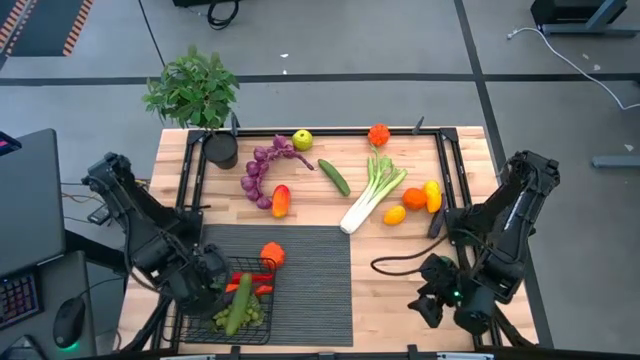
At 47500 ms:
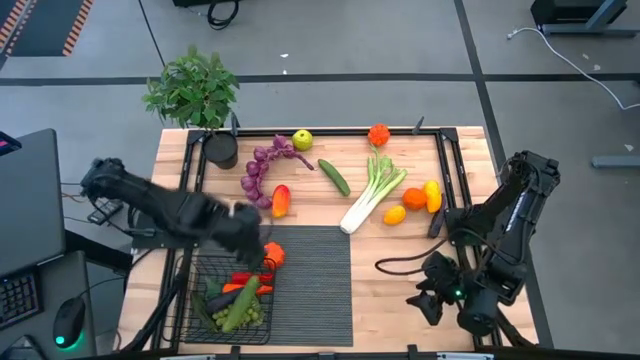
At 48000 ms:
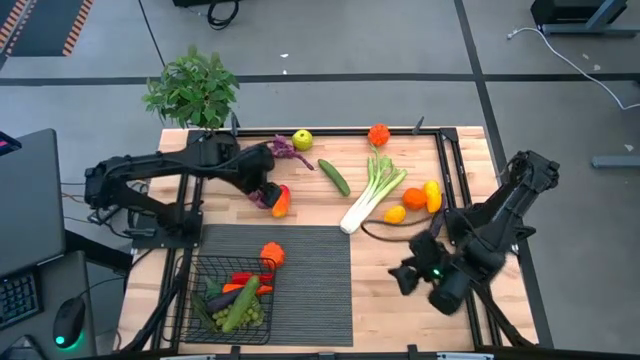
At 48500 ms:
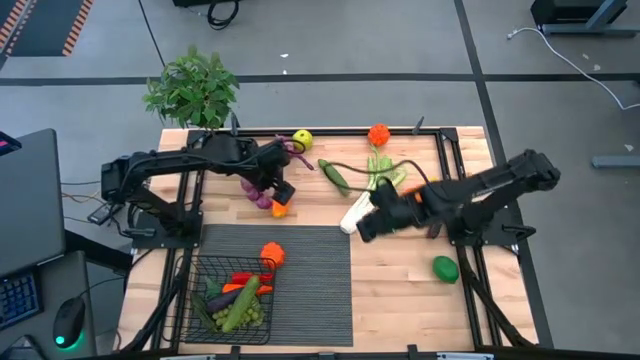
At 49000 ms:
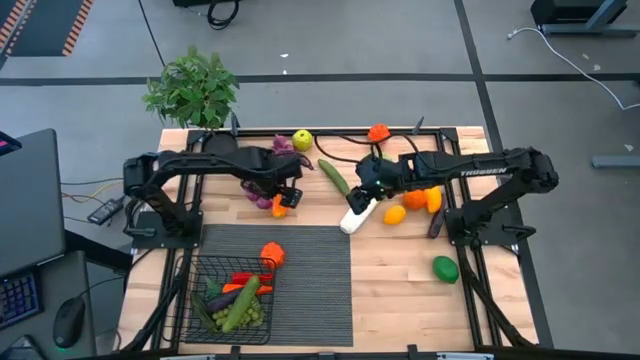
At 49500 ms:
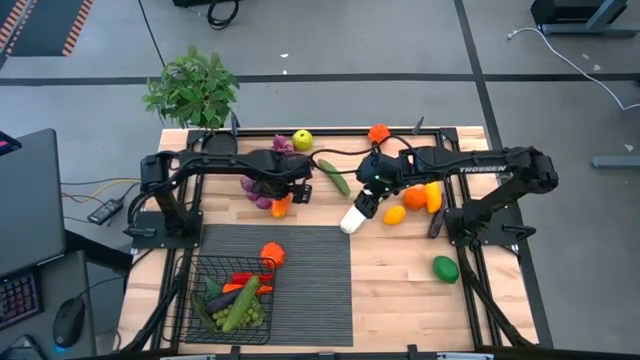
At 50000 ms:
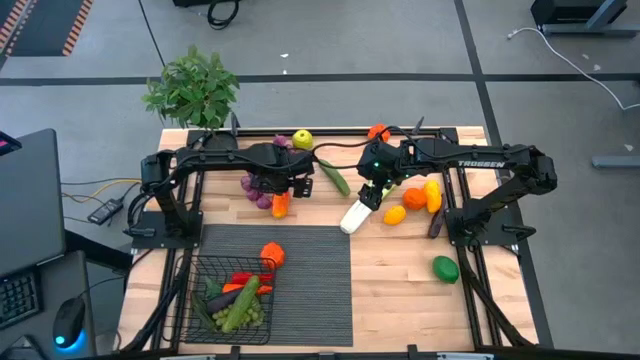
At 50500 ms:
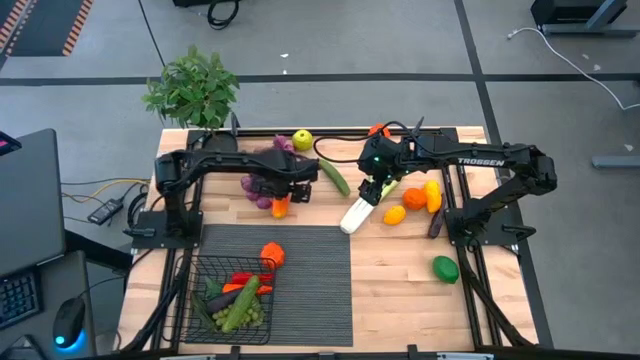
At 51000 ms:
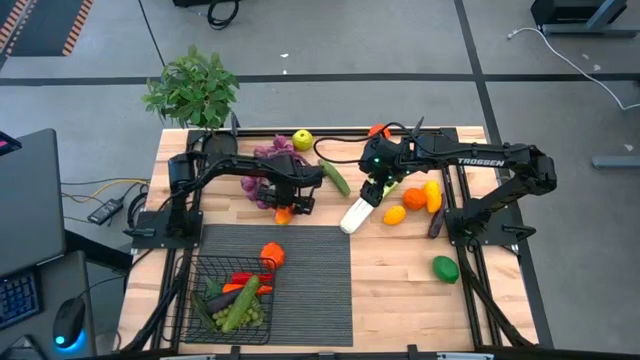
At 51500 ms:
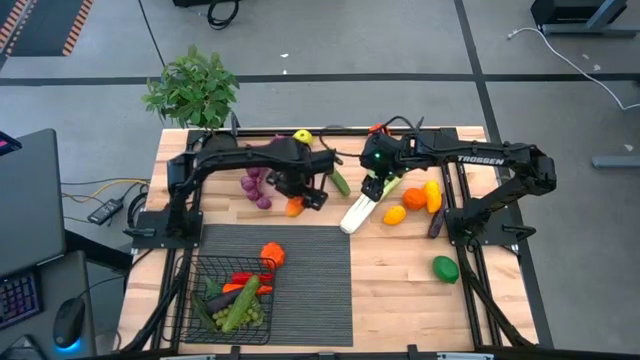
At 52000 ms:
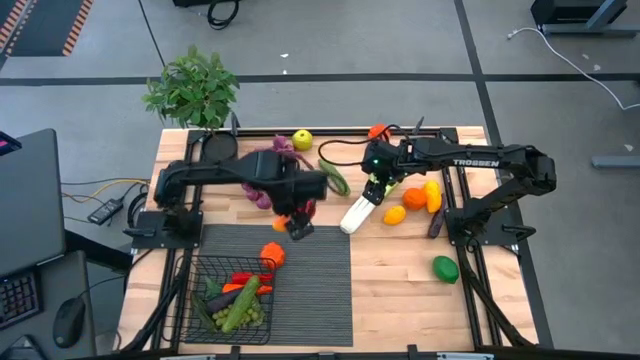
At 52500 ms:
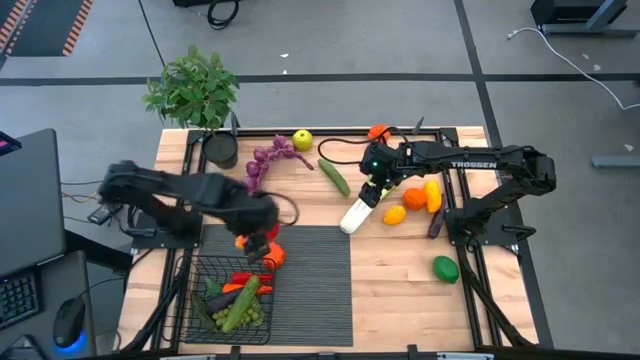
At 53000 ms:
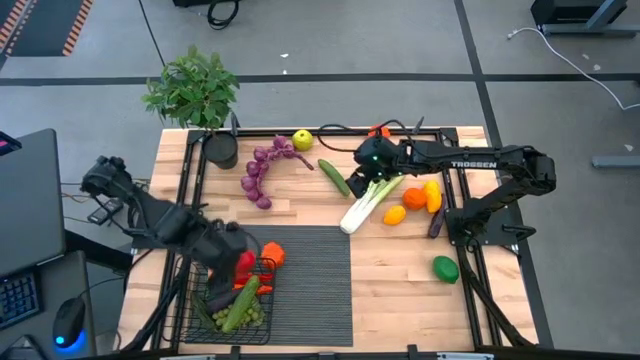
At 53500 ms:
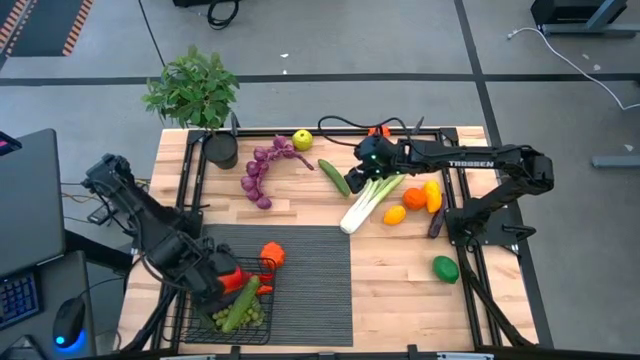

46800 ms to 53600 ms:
Task: Build produce basket
Put the orange mango into the wire basket

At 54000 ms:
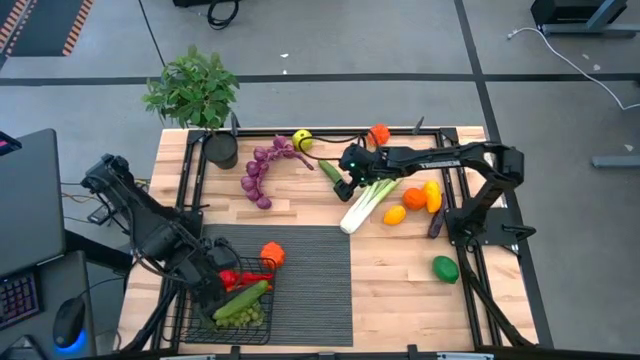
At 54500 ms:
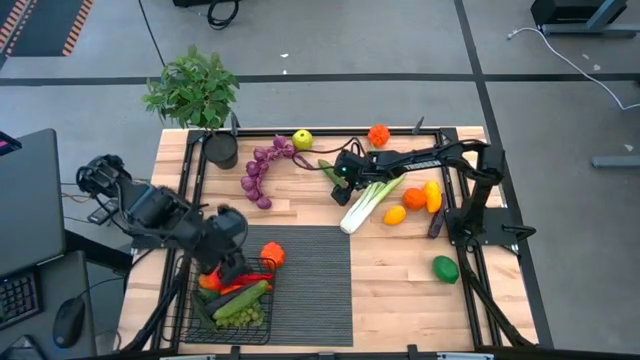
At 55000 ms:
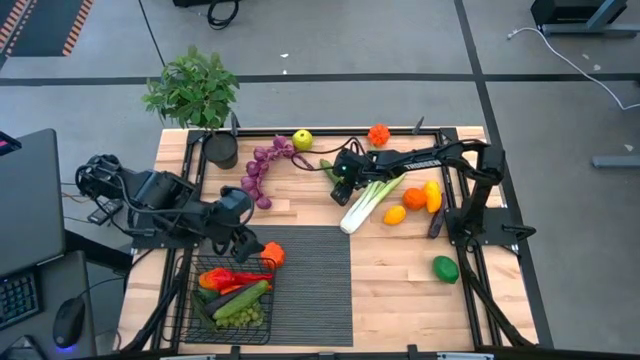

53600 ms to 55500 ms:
Put the green cucumber into the wire basket

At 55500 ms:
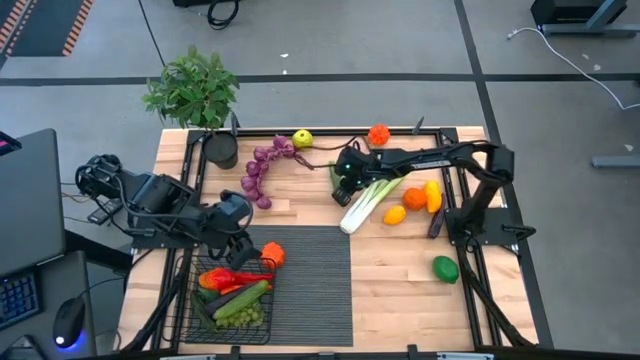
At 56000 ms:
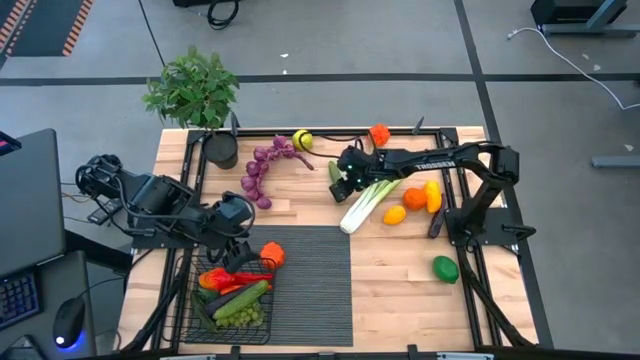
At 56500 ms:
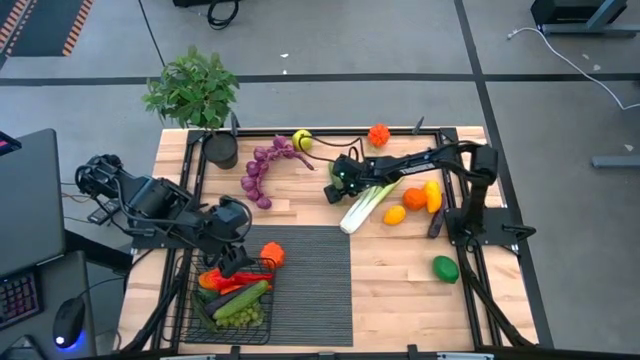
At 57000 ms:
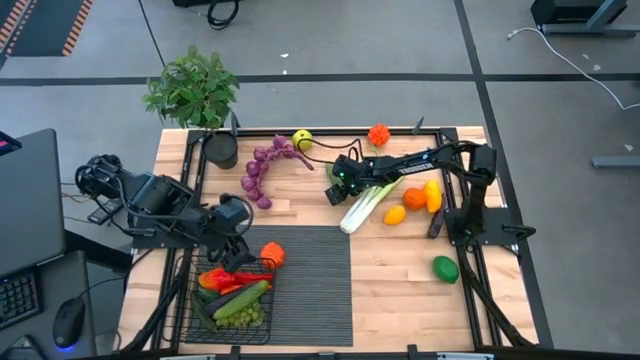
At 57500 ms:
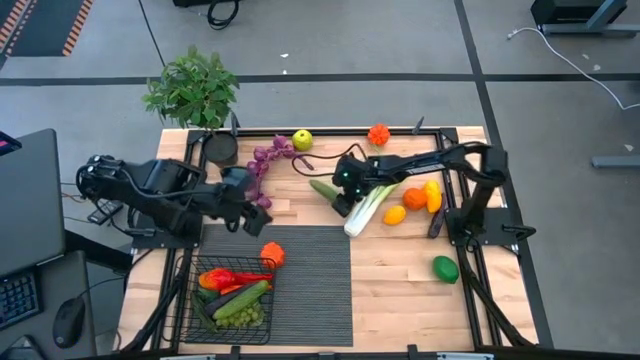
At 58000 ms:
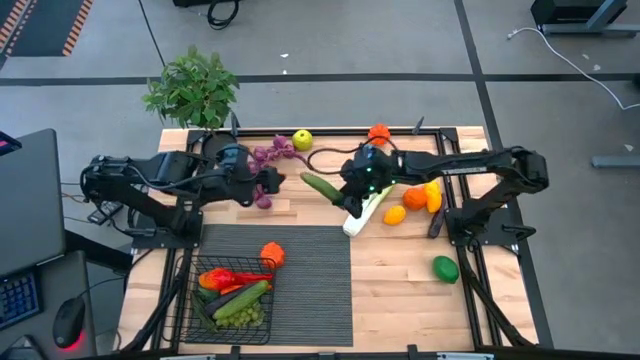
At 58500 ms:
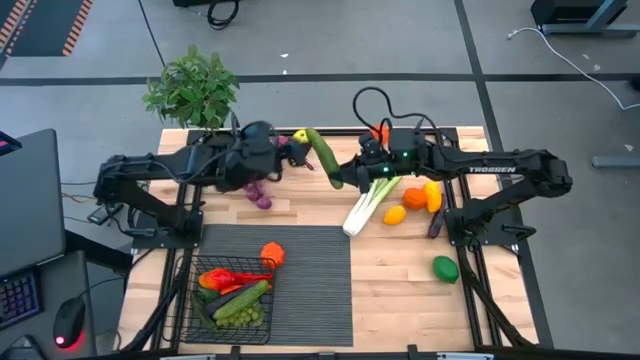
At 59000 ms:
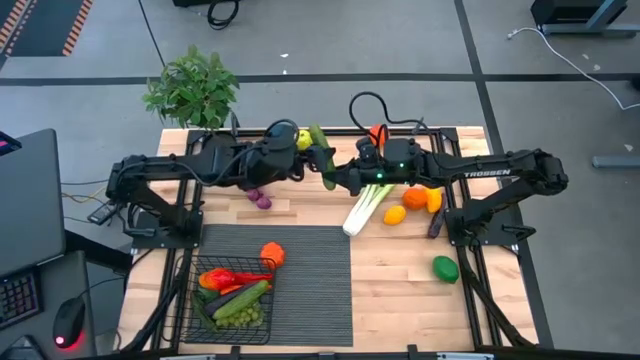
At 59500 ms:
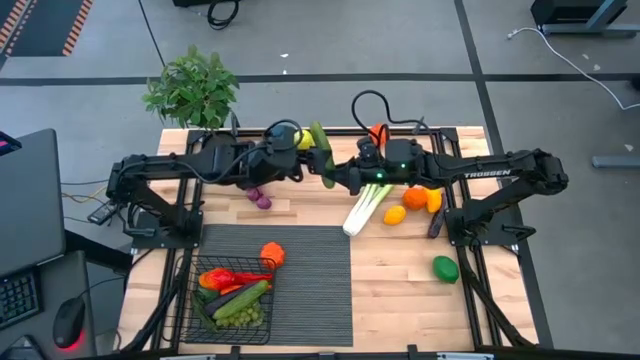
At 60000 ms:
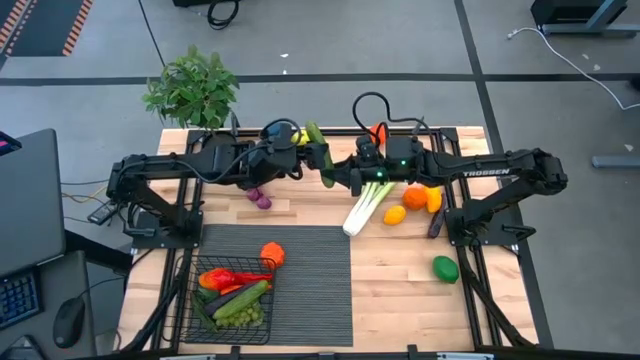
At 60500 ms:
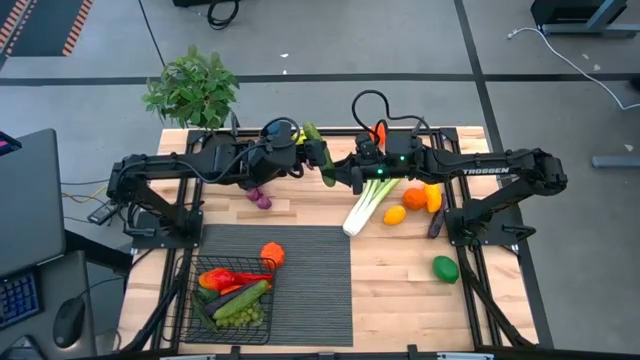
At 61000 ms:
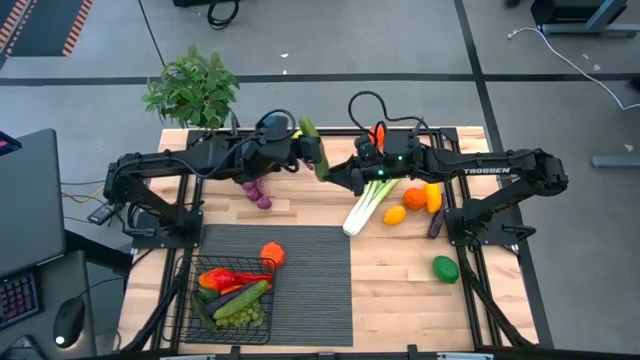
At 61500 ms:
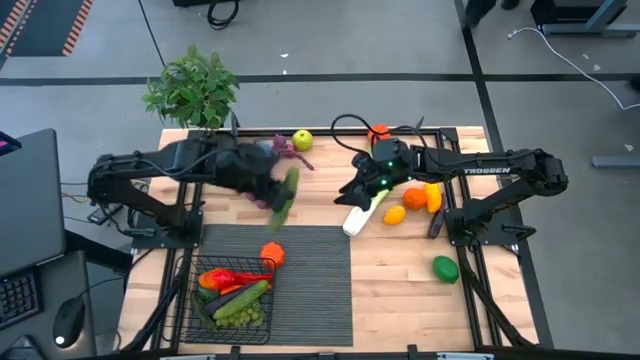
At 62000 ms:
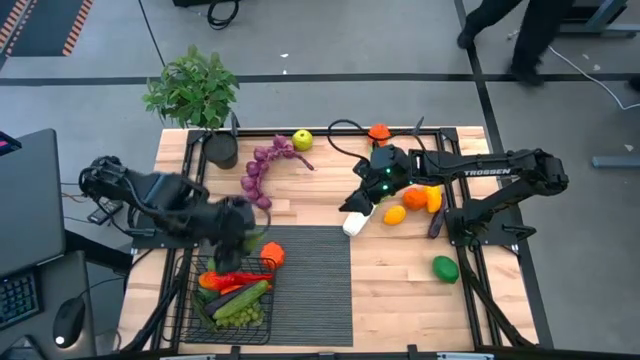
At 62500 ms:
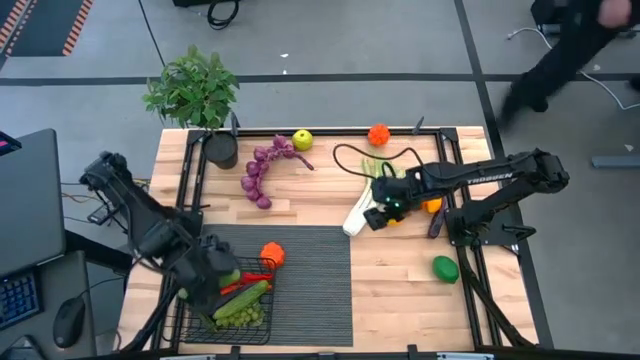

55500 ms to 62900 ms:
Put the green cucumber into the wire basket

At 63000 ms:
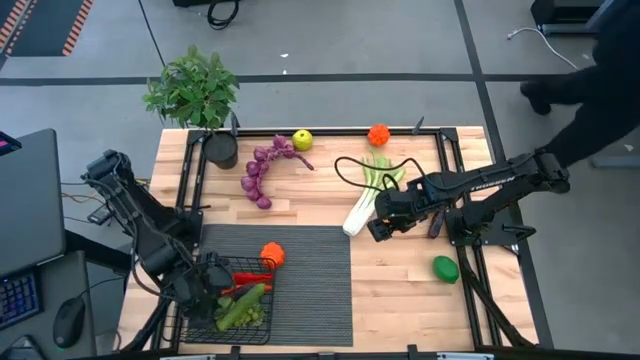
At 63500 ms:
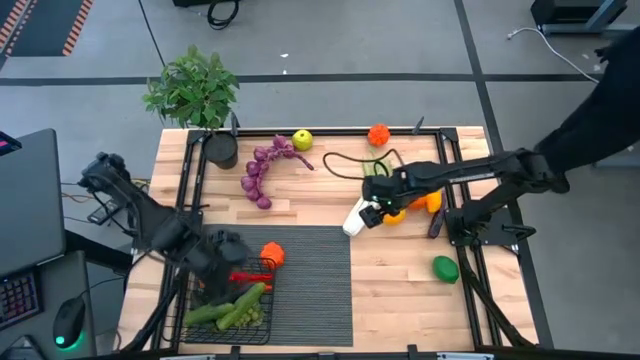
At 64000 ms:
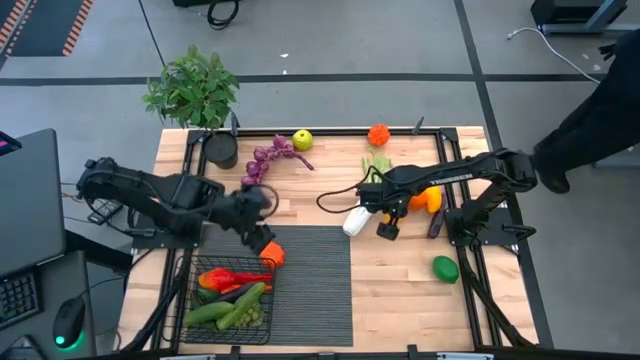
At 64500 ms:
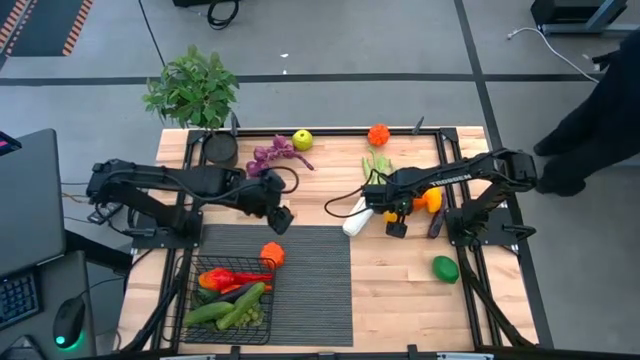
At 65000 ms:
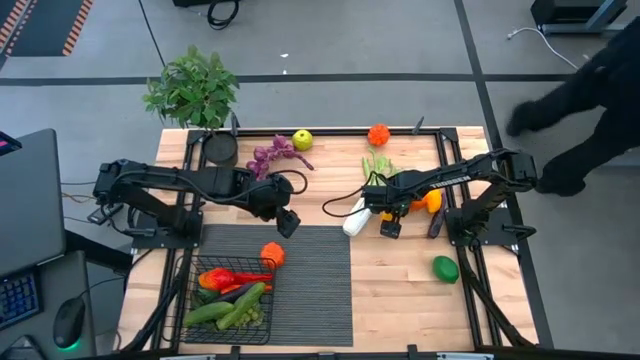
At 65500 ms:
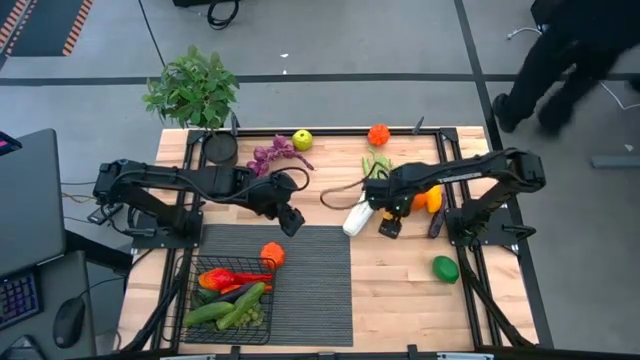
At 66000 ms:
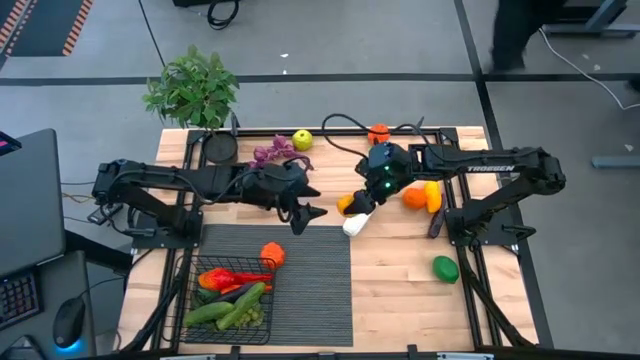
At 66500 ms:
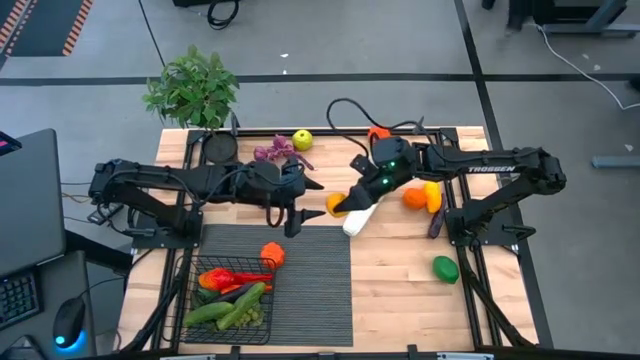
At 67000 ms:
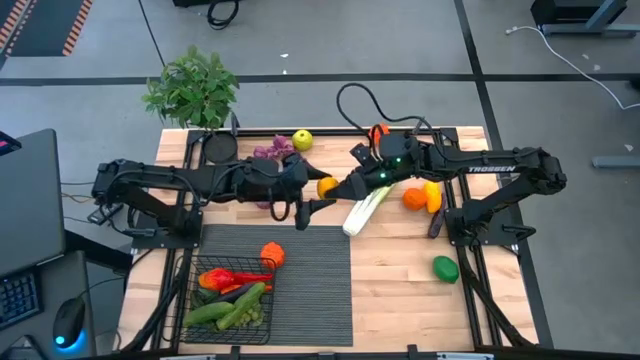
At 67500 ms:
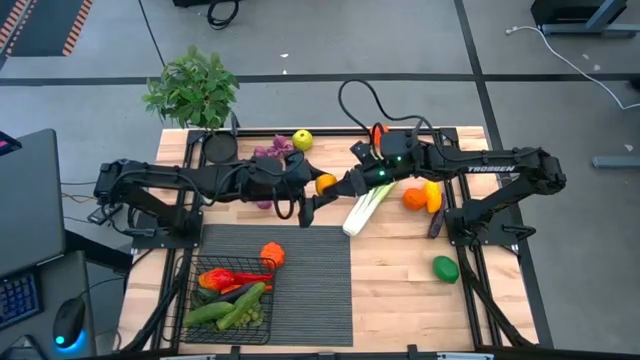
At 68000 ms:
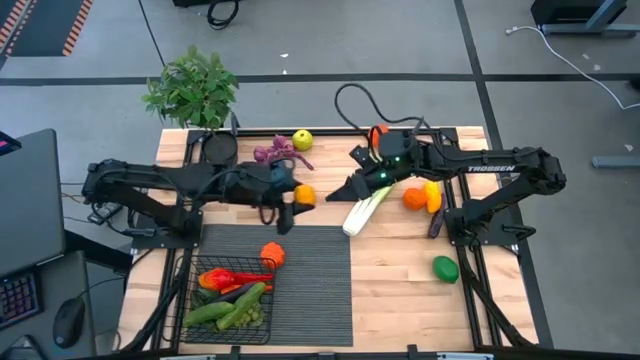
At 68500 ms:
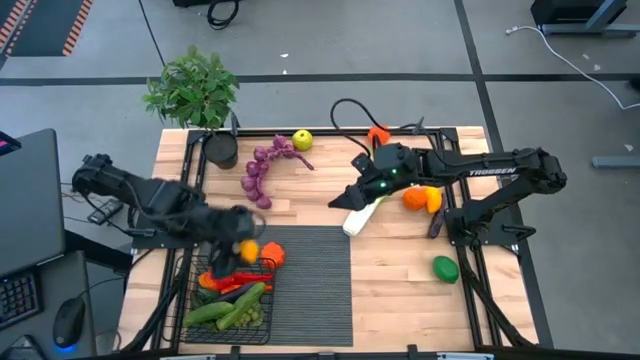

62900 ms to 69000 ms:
Put the yellow lemon into the wire basket
